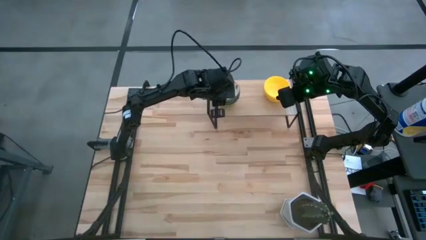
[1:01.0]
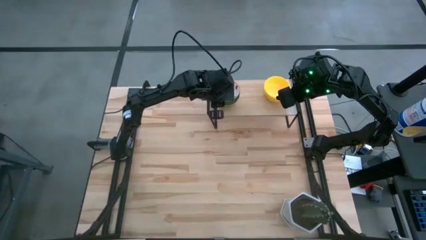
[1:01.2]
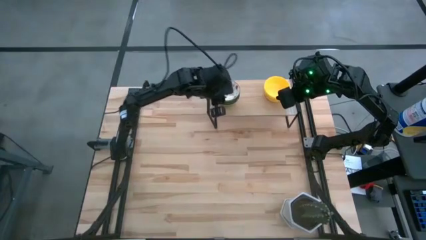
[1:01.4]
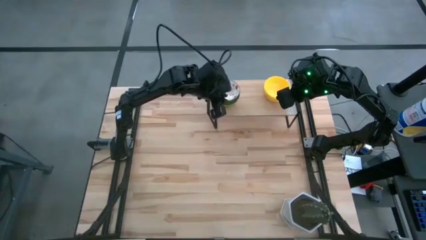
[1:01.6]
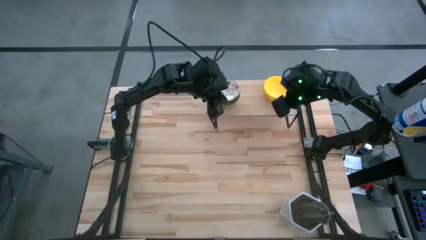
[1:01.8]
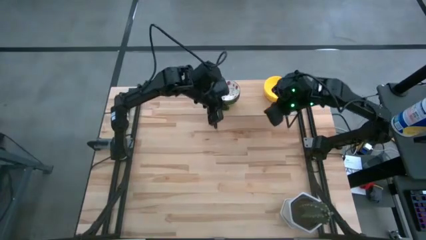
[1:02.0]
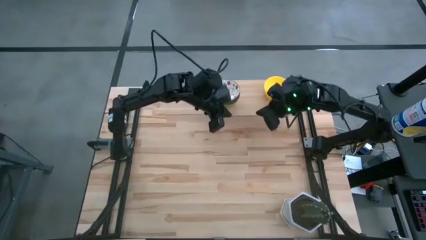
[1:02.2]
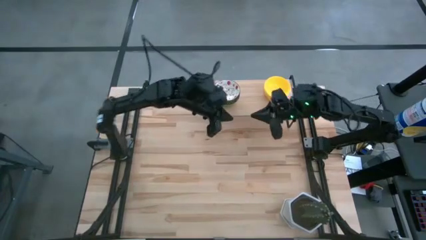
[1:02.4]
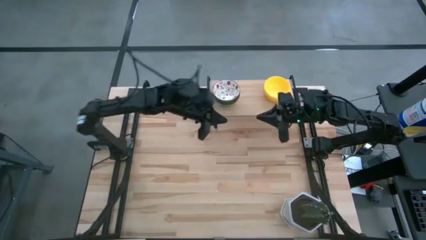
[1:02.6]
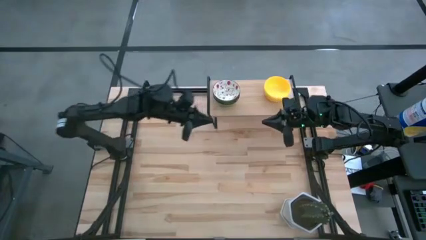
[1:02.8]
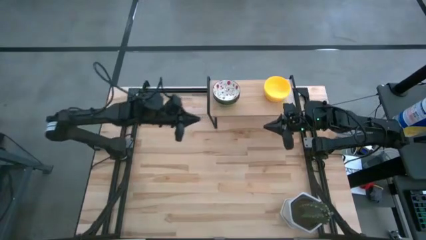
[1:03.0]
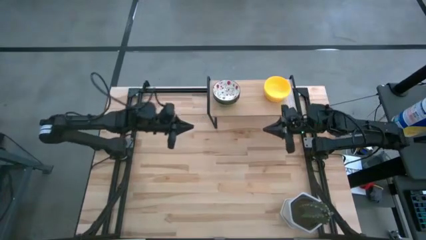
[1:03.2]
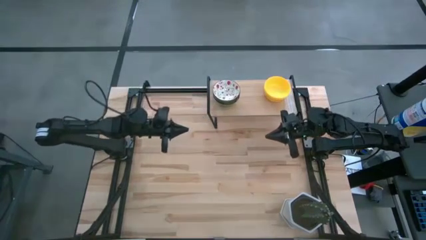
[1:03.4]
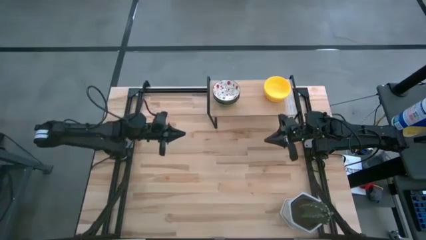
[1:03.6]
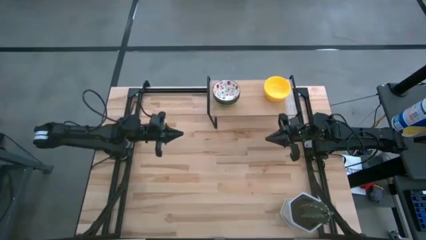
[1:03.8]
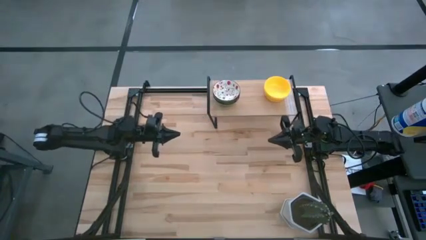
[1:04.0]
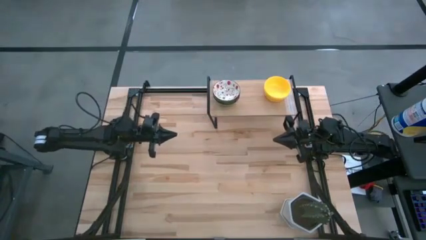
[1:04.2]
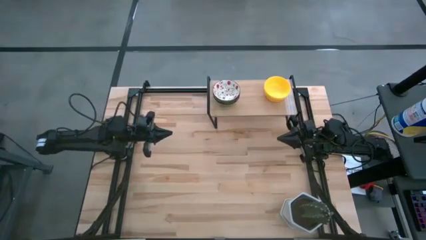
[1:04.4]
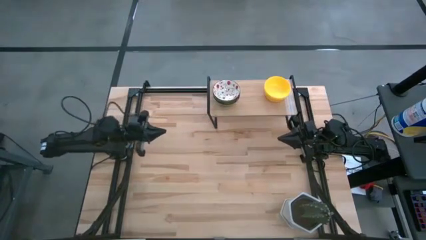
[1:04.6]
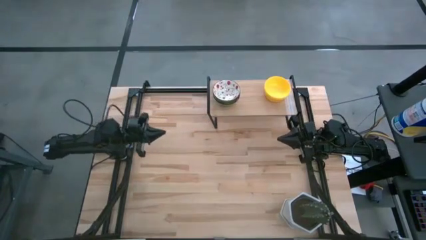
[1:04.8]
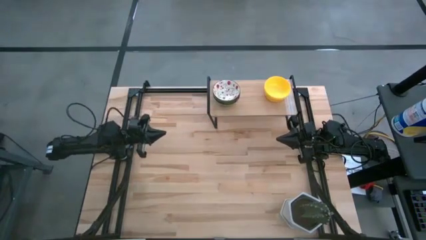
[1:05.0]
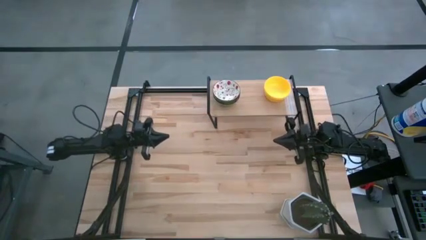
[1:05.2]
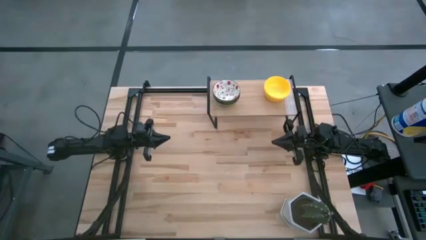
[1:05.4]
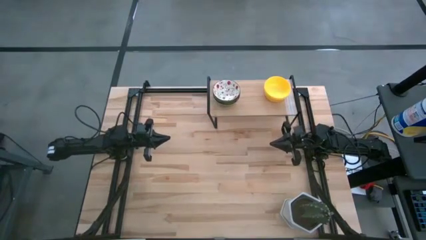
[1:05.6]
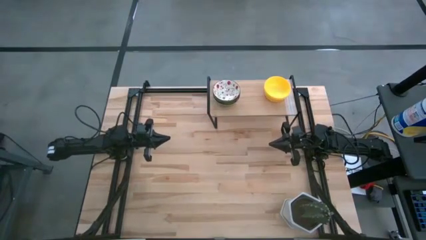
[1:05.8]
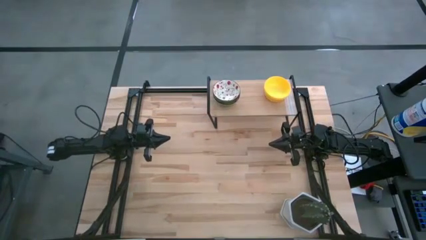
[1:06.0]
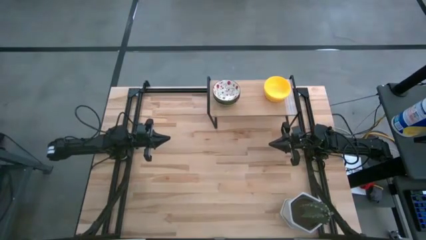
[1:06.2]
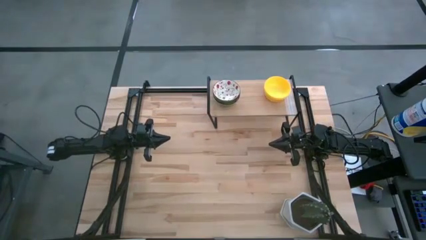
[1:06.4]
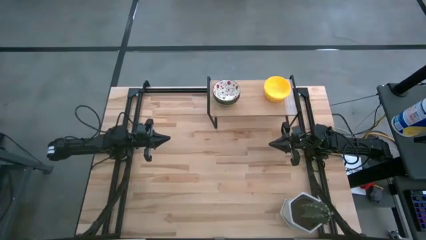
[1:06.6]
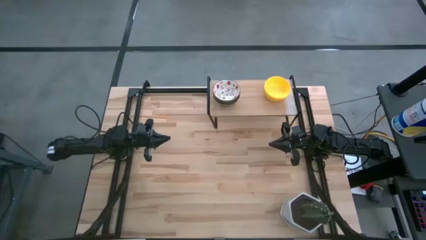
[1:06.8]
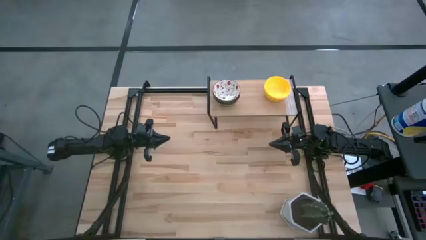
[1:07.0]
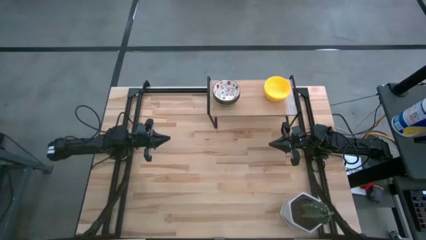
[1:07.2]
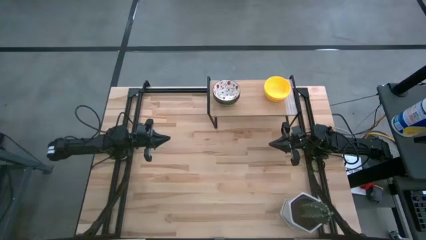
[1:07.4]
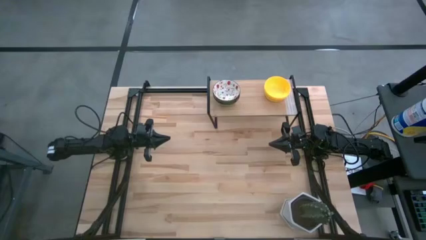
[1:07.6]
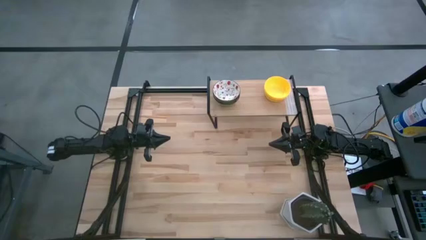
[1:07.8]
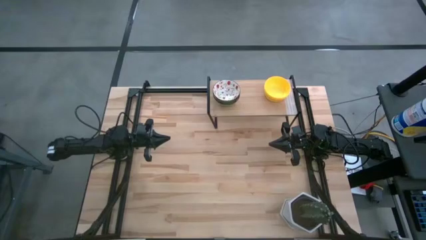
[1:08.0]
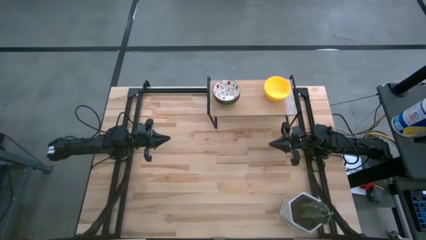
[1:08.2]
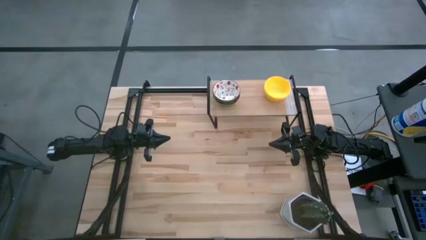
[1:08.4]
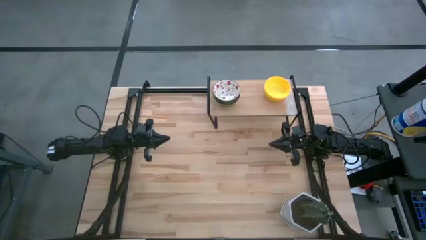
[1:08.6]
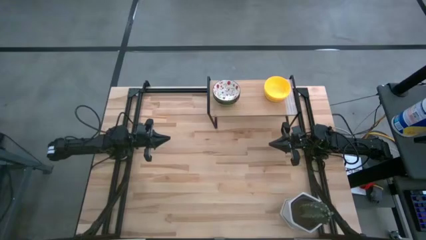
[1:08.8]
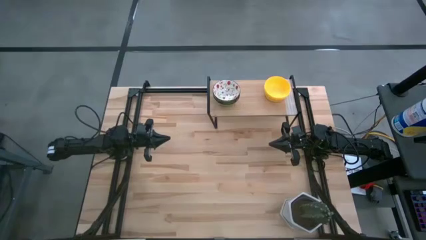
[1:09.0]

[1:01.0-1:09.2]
Task: Pick & Place Mini bowls
Return to Home Position

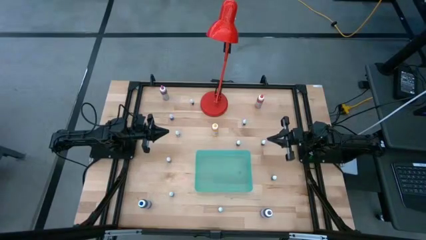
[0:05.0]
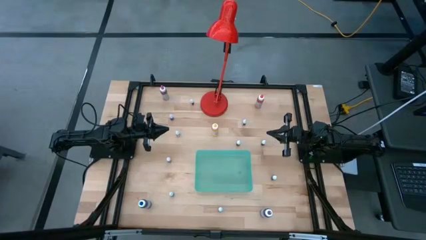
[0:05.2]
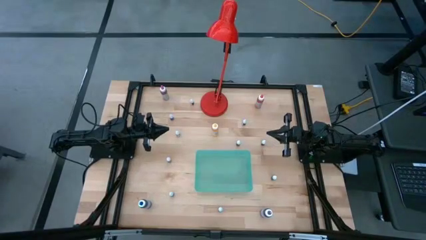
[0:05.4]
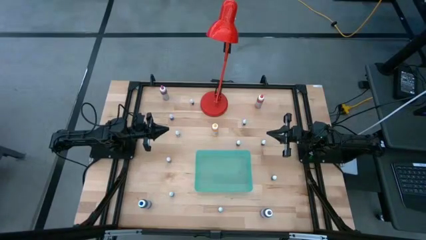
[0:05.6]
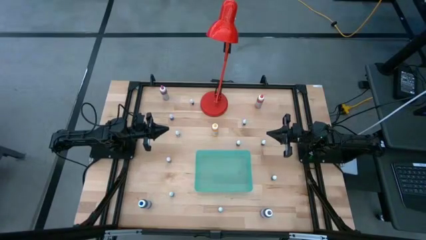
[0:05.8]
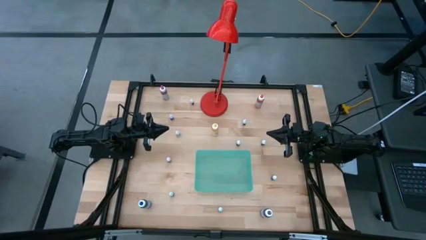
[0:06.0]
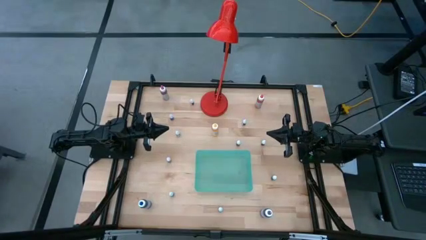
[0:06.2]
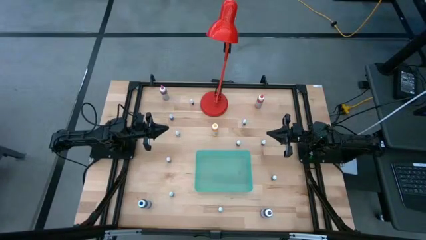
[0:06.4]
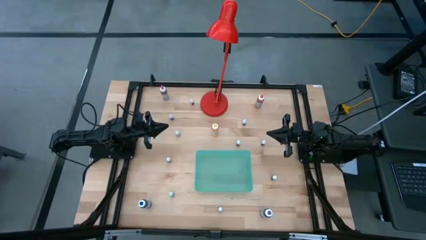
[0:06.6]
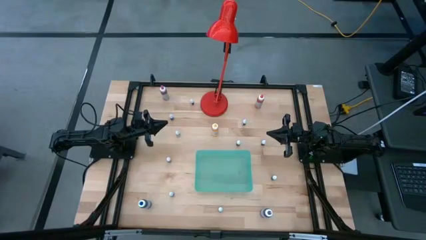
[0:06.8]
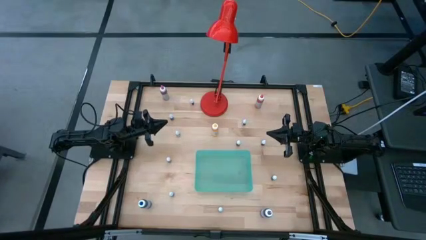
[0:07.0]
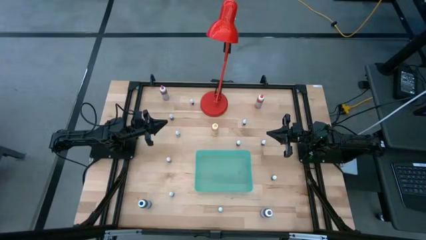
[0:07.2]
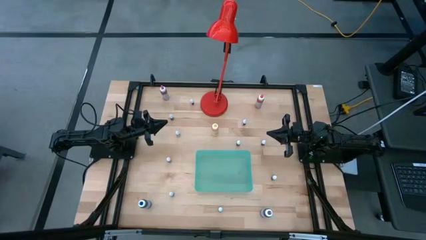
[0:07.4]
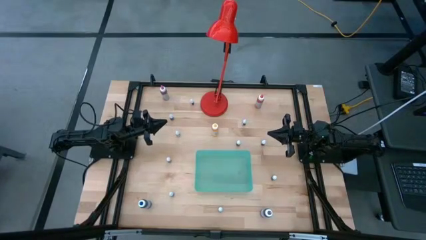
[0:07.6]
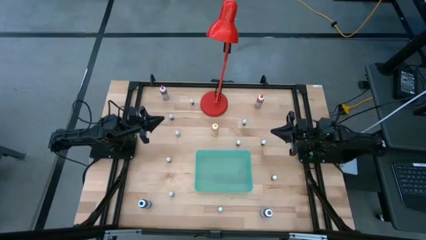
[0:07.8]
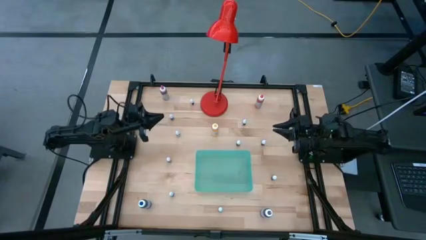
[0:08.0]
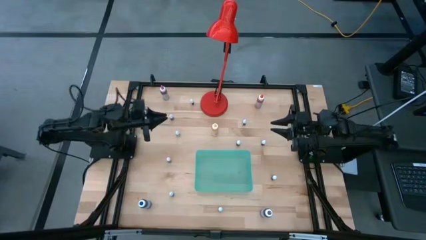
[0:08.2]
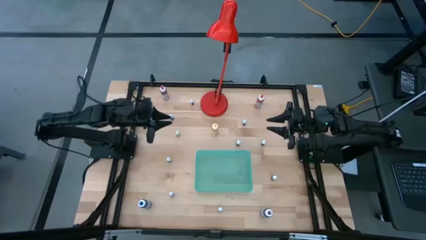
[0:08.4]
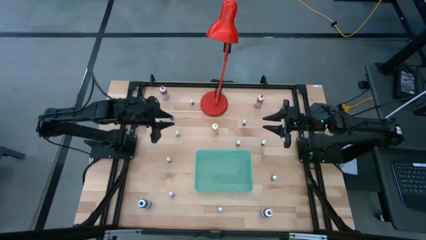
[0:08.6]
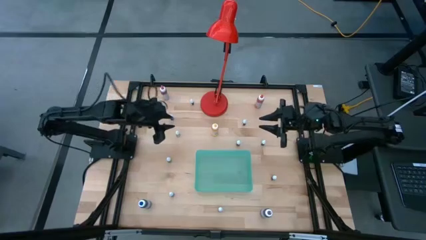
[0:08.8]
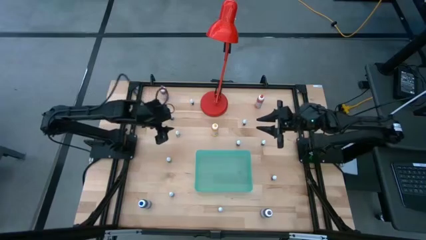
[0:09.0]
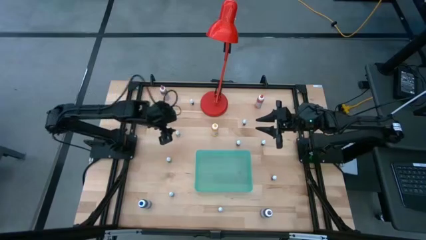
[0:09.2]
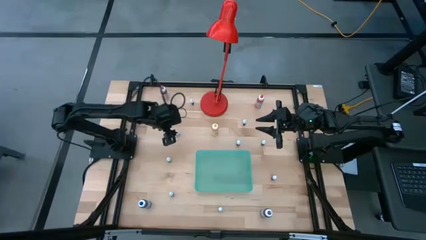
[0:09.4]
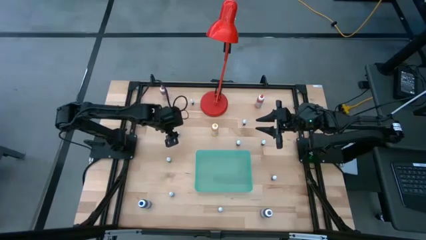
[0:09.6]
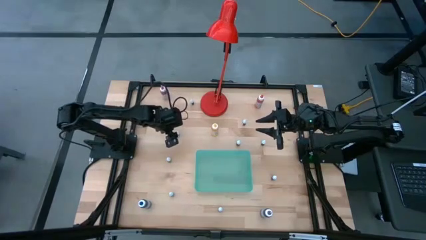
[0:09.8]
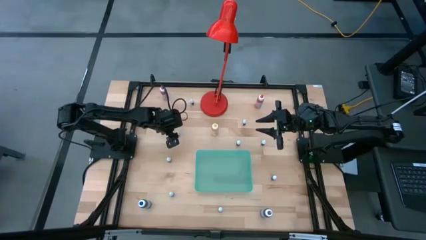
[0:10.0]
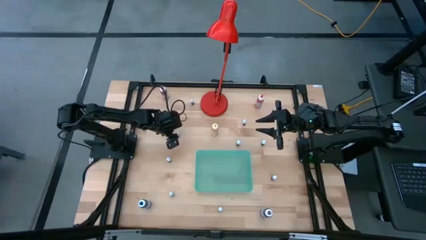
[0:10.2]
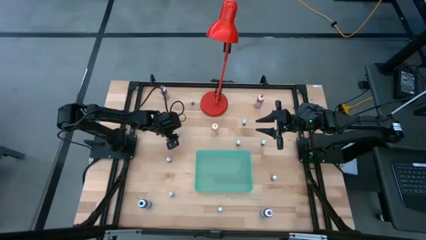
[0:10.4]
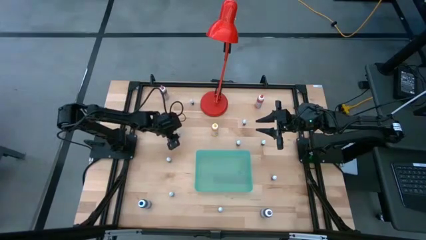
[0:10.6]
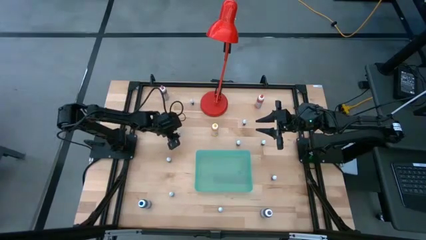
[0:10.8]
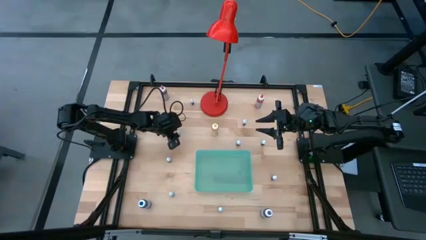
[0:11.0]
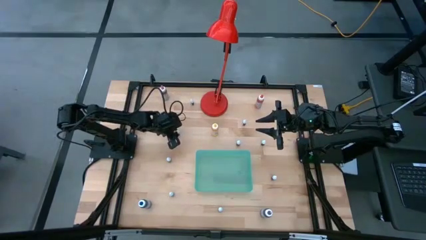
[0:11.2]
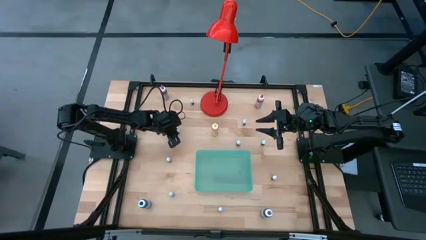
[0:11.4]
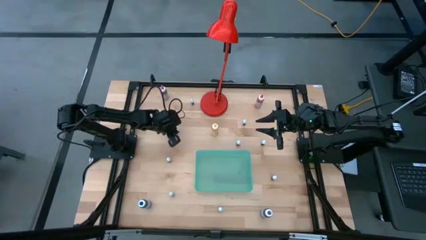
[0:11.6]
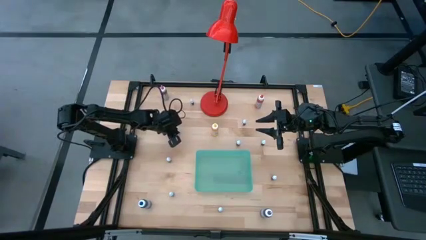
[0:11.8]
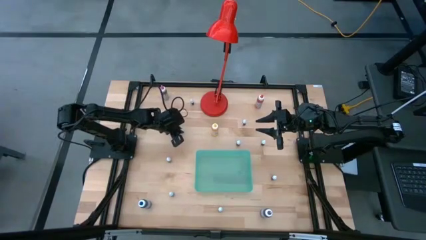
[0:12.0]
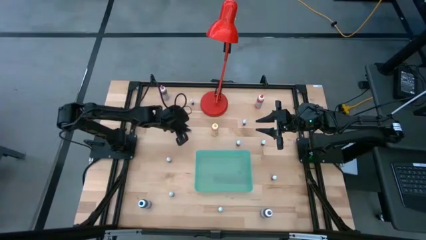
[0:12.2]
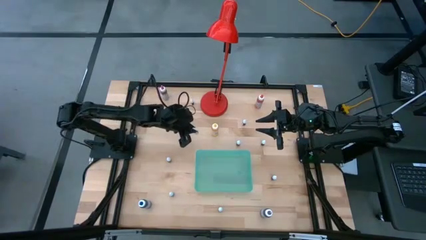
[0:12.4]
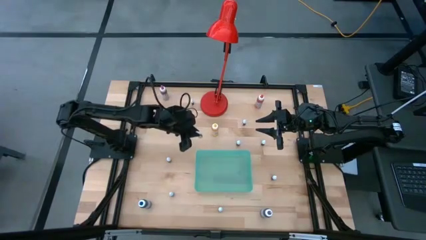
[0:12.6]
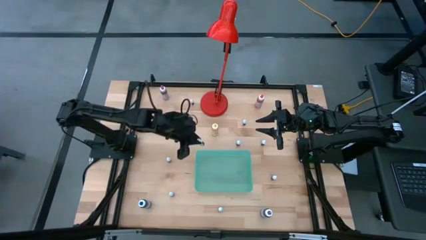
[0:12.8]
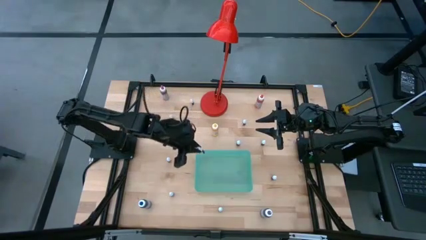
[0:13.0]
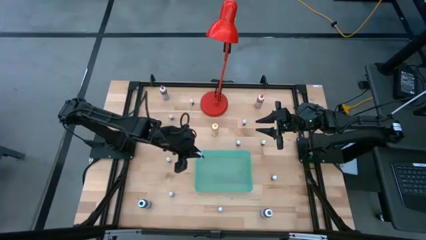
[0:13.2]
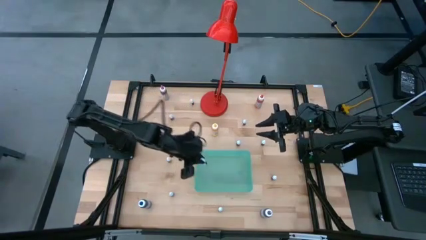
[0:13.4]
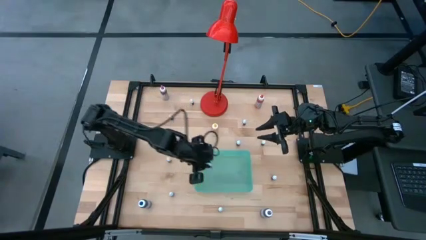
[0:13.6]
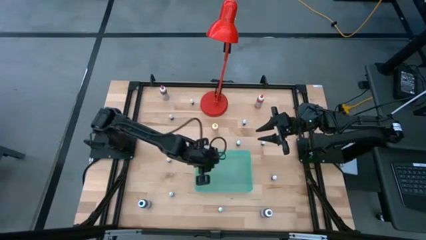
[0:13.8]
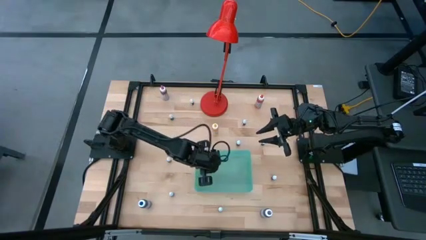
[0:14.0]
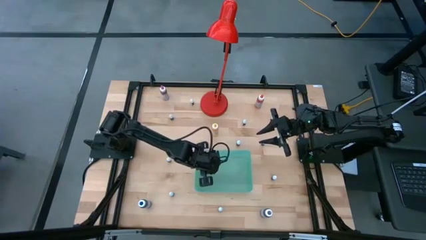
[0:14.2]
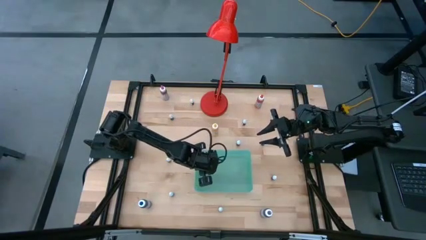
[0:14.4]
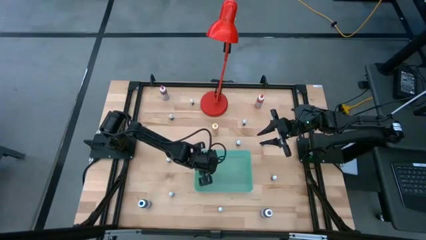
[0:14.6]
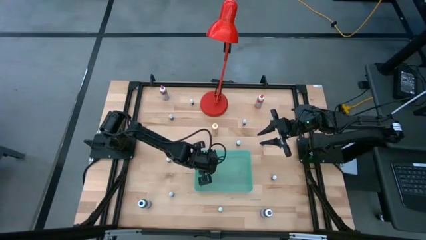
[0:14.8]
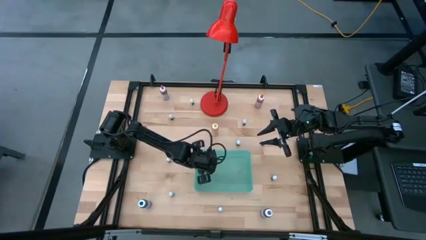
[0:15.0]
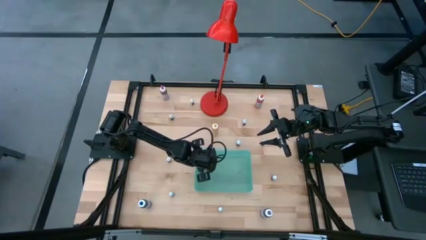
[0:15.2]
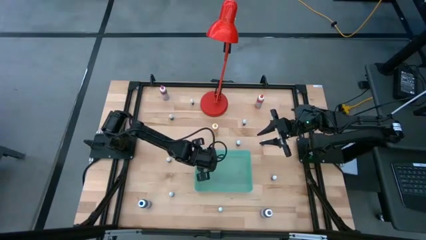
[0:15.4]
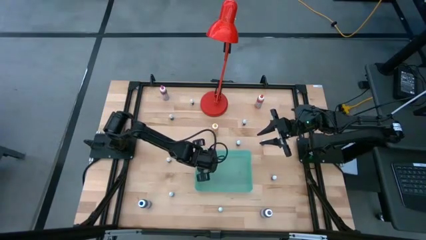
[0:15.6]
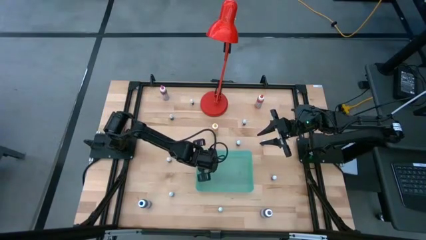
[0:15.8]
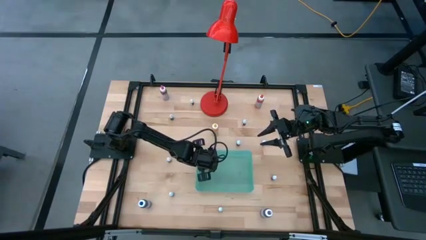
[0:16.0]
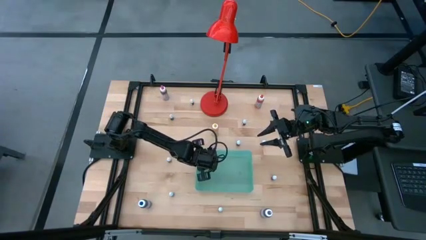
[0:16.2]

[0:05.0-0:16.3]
Task: Pick & Place food coloring
Put the small black food coloring bottle into the blue bin
